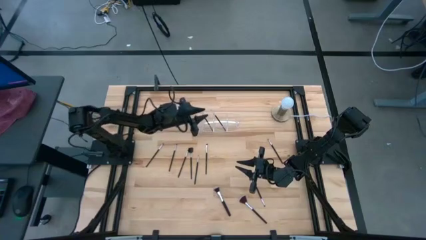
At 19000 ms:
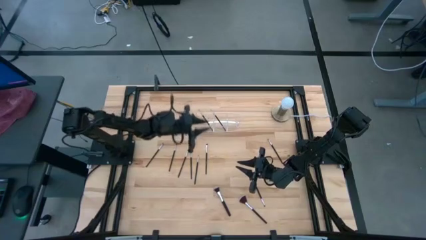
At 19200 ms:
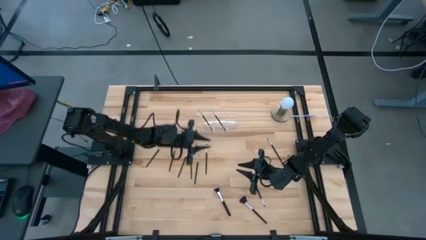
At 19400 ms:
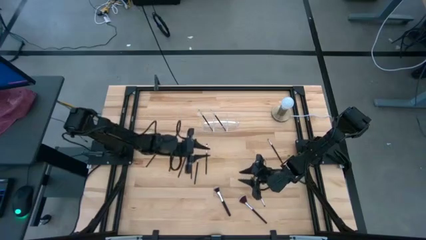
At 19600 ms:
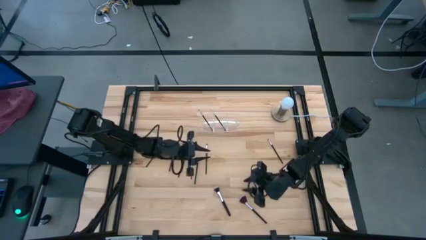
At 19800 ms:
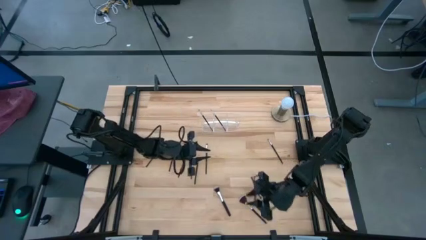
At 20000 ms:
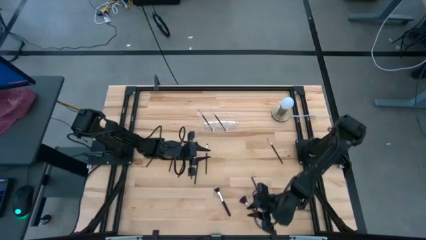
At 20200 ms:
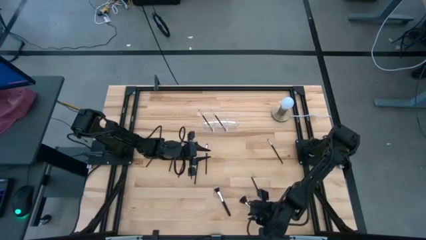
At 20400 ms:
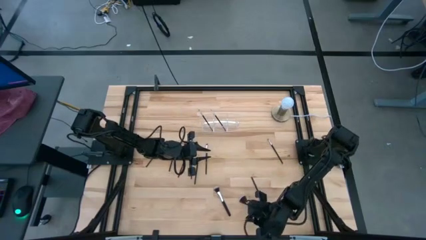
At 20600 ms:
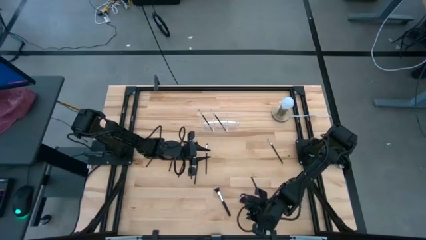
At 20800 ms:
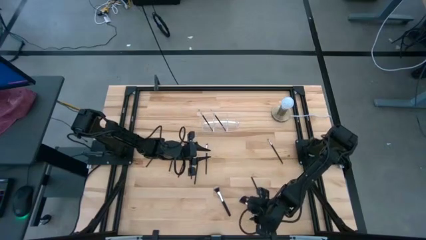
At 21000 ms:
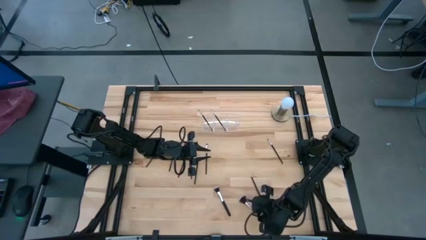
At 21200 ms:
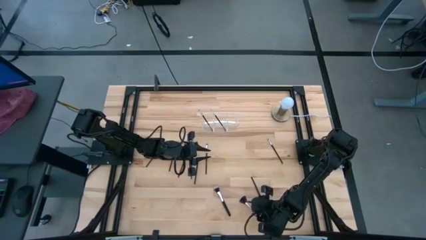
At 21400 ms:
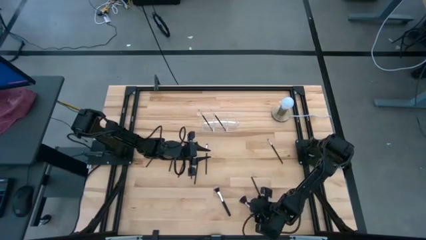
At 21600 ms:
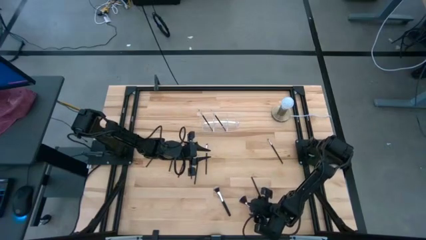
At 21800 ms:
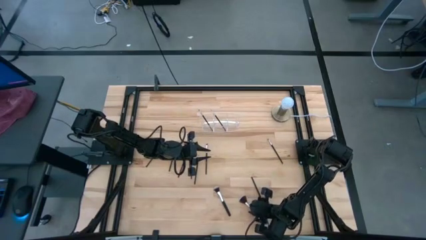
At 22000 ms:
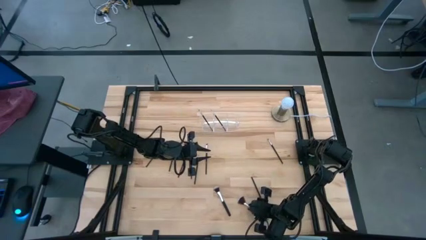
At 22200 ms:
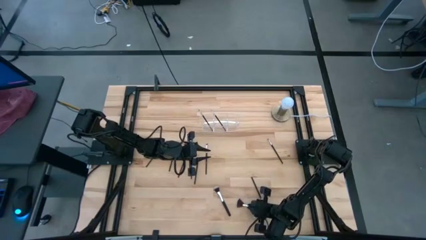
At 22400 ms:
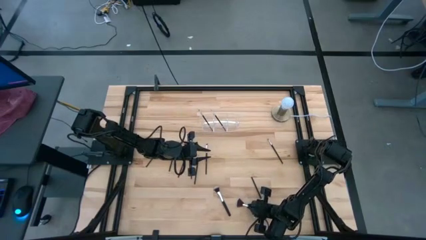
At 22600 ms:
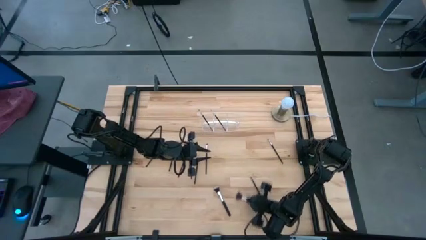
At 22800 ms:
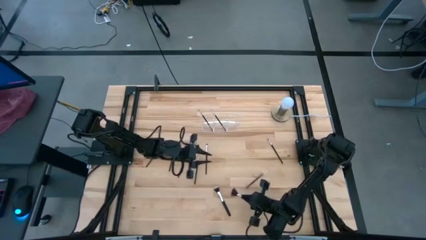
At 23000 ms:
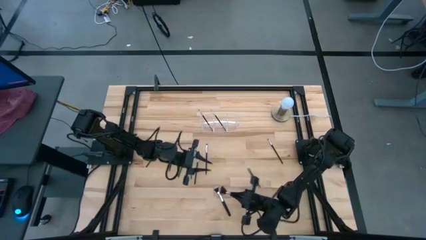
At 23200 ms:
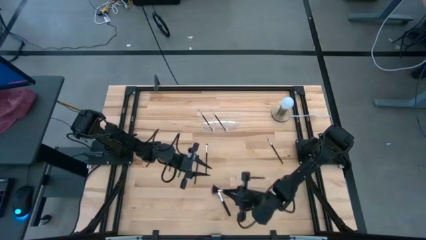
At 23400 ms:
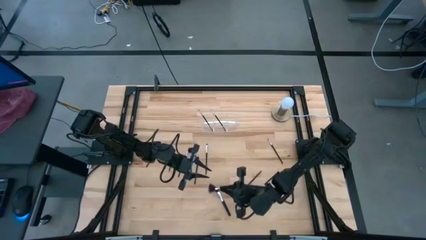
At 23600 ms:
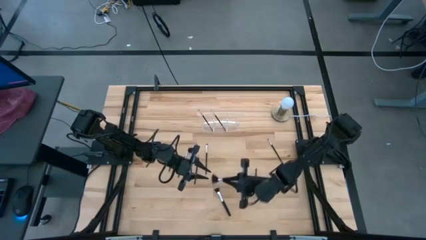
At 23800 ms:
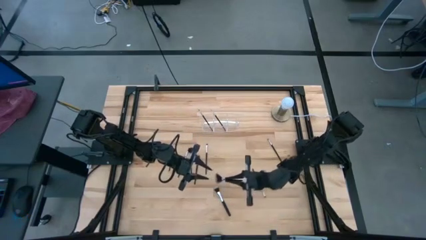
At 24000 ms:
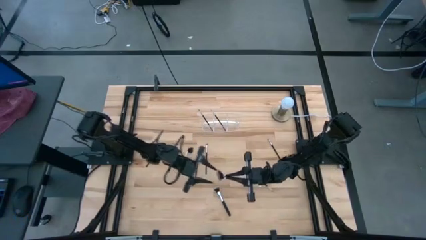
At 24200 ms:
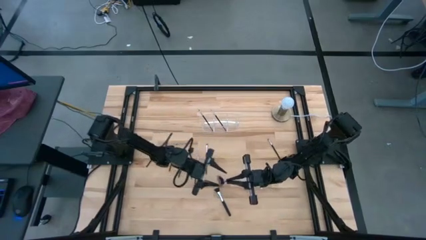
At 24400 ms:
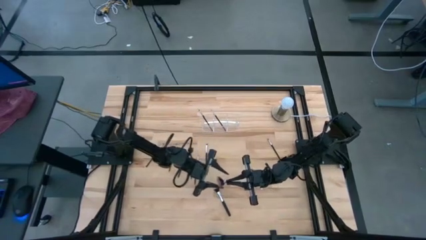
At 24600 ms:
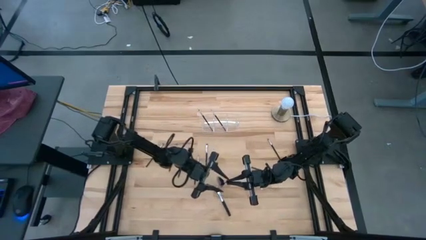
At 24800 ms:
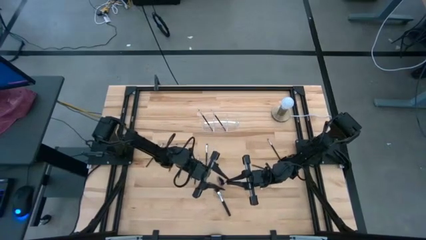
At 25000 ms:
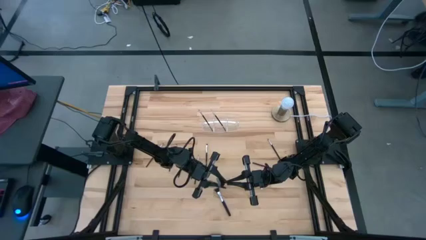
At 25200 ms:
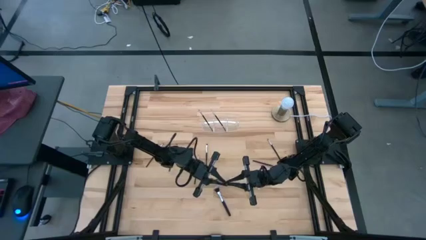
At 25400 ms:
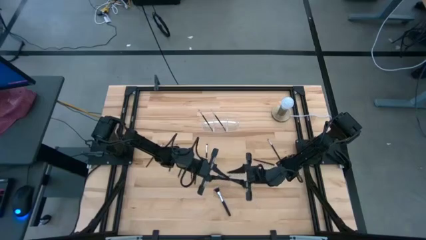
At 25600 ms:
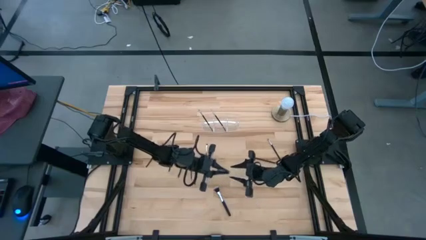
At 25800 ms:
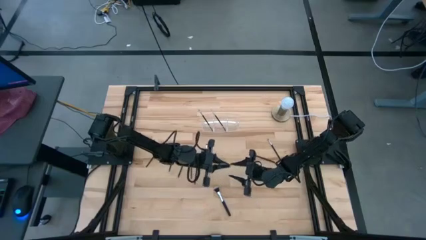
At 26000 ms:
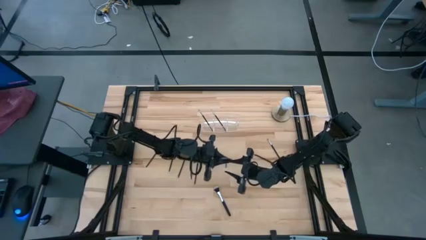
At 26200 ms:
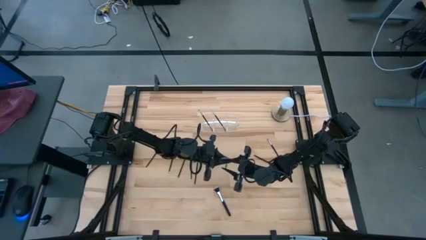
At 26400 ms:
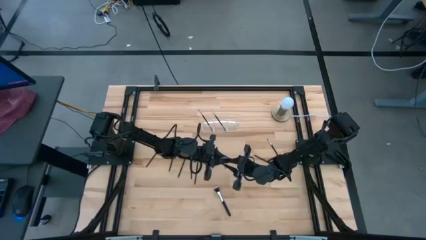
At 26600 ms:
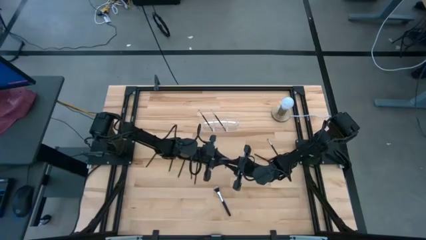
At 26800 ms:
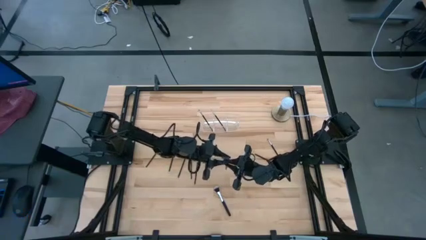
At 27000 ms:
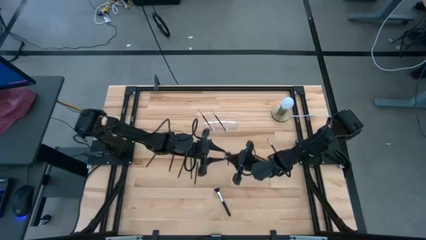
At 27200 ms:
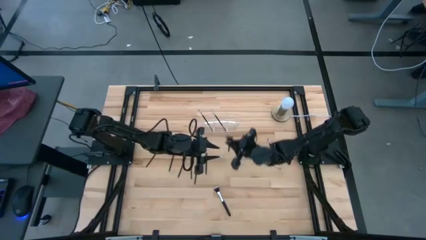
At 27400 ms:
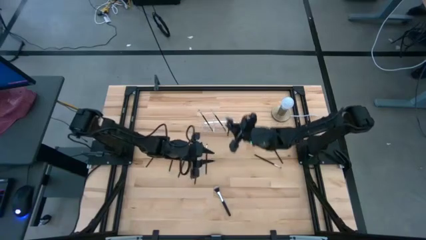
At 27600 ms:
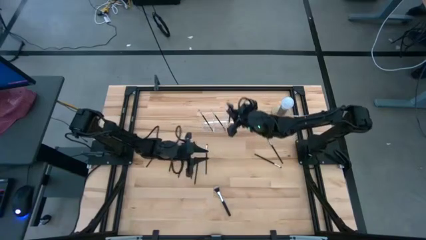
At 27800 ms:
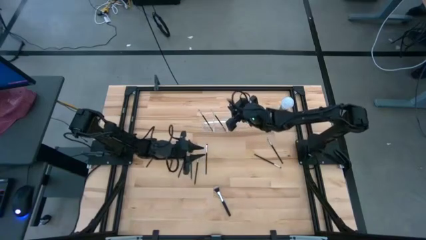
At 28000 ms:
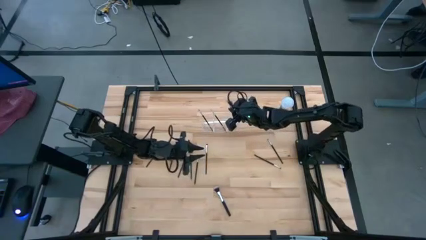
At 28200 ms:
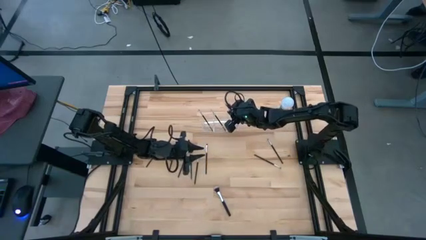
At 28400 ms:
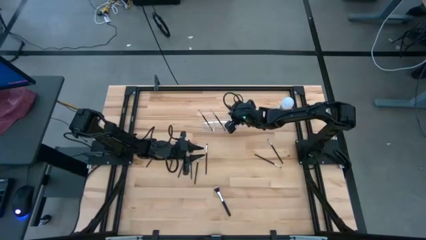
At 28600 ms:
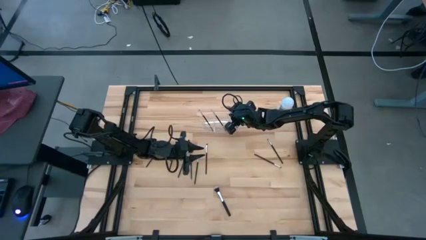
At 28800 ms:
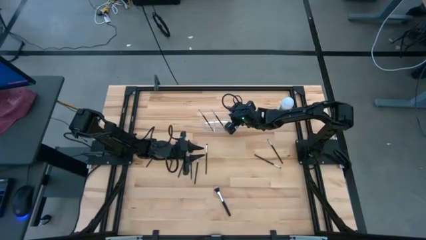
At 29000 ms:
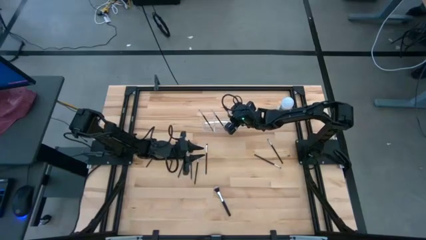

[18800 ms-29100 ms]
Task: Put items in baskets/containers
Put the black highlighter brush into the transparent organizer

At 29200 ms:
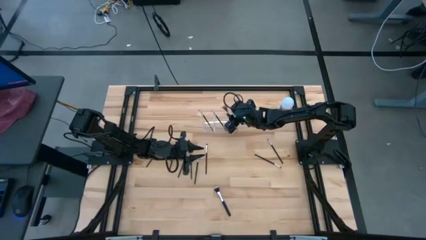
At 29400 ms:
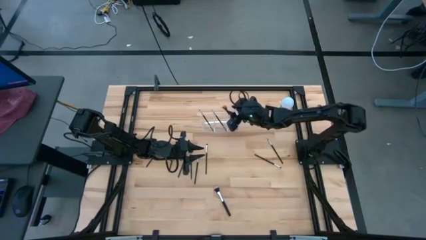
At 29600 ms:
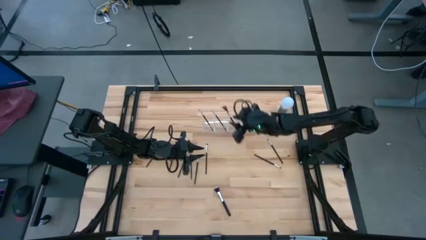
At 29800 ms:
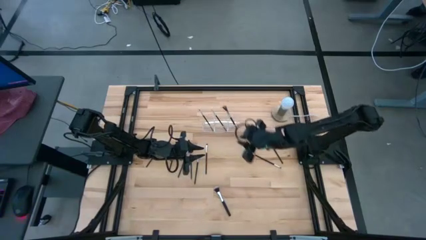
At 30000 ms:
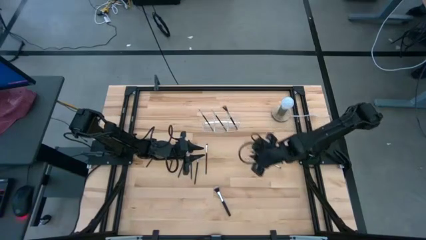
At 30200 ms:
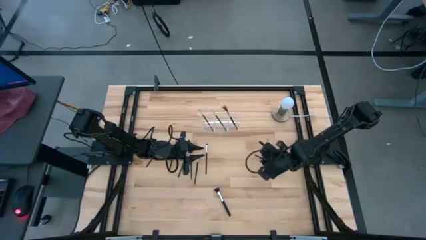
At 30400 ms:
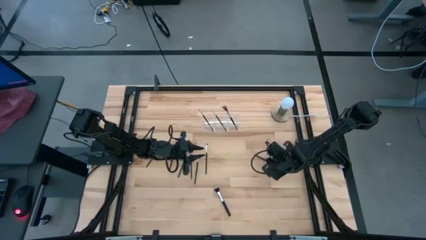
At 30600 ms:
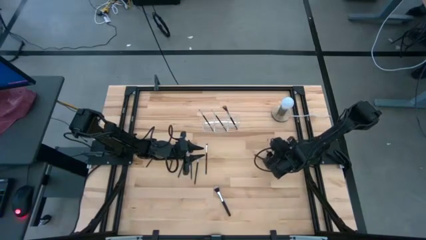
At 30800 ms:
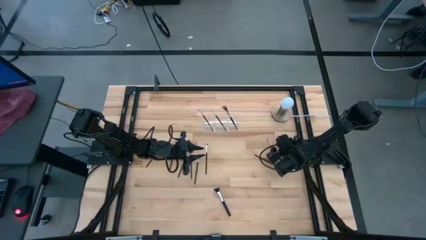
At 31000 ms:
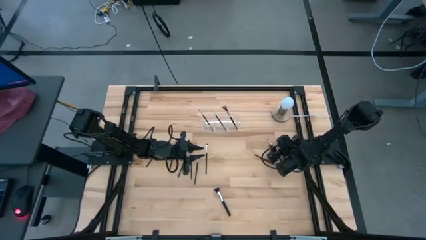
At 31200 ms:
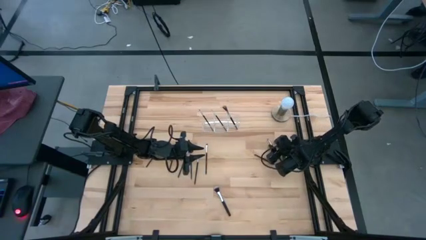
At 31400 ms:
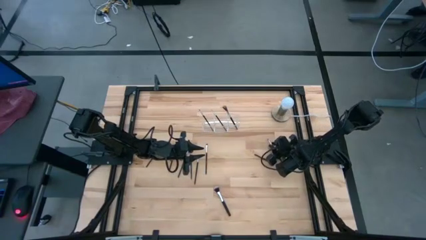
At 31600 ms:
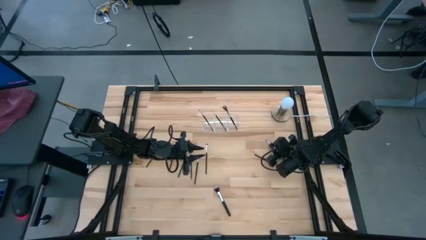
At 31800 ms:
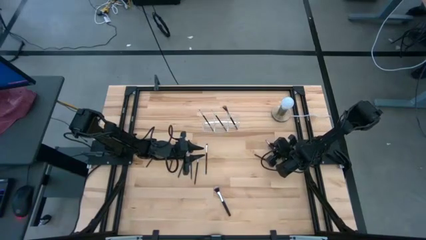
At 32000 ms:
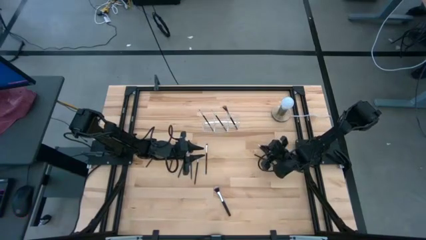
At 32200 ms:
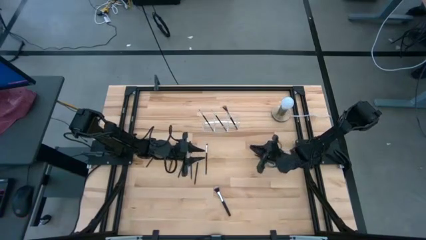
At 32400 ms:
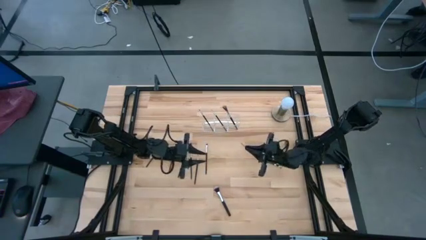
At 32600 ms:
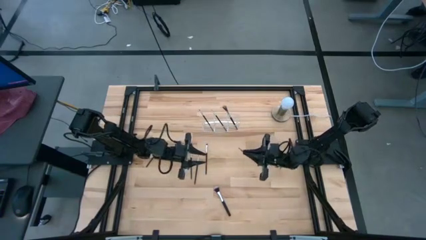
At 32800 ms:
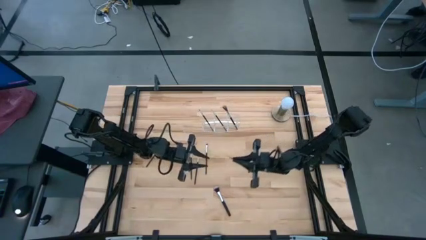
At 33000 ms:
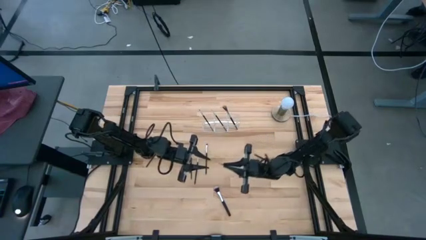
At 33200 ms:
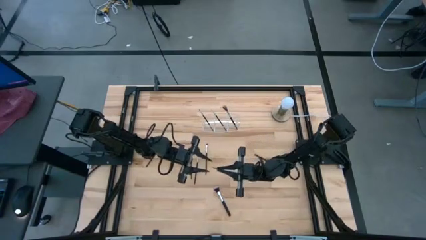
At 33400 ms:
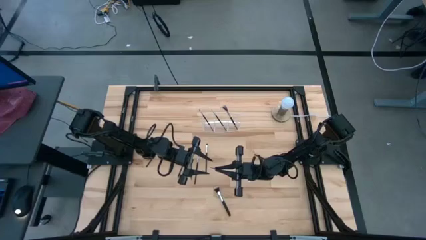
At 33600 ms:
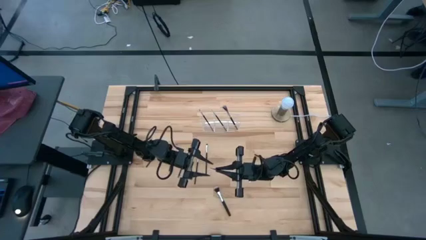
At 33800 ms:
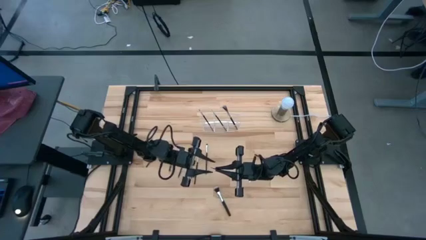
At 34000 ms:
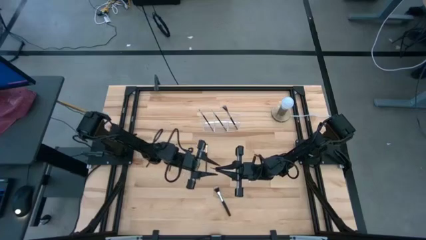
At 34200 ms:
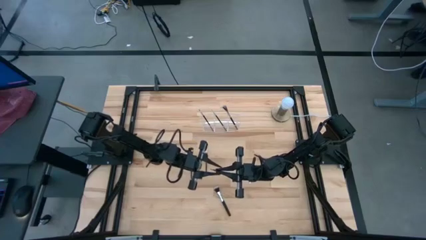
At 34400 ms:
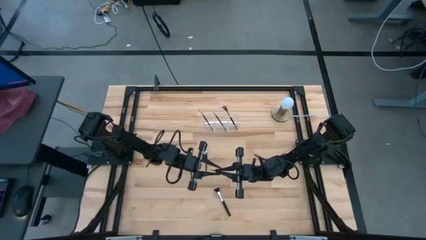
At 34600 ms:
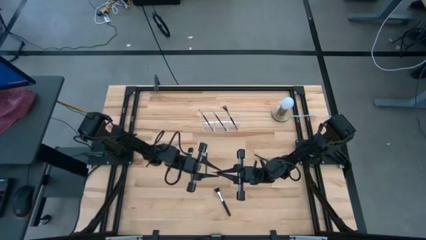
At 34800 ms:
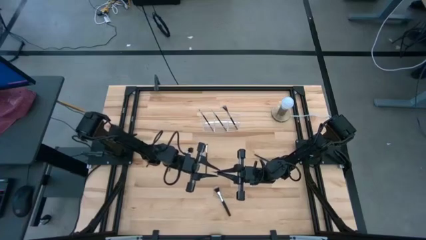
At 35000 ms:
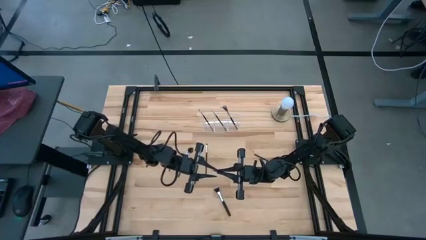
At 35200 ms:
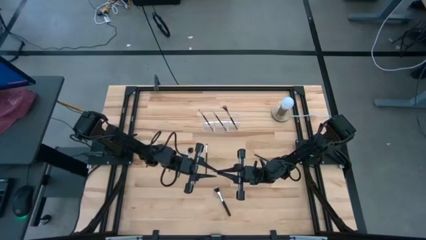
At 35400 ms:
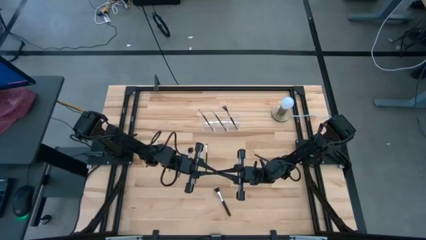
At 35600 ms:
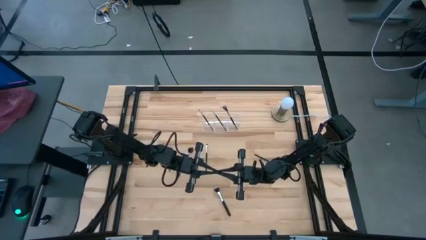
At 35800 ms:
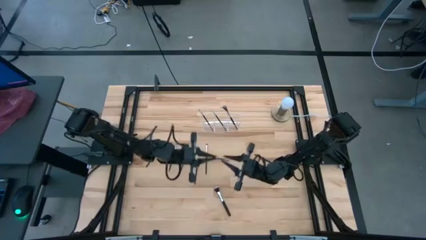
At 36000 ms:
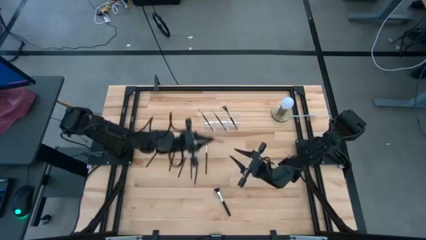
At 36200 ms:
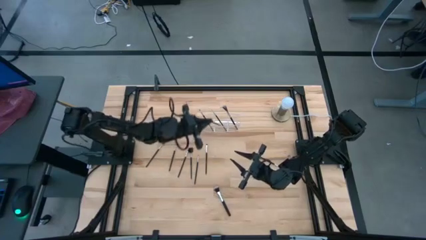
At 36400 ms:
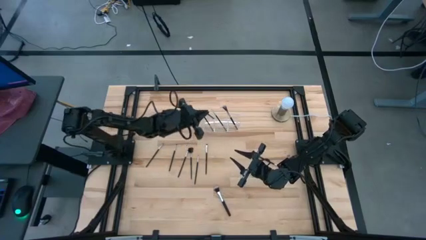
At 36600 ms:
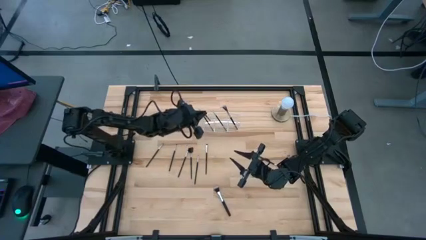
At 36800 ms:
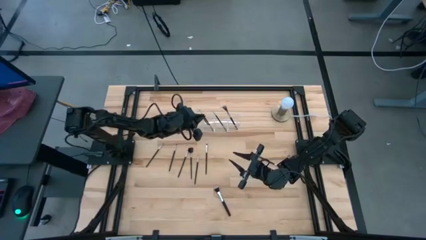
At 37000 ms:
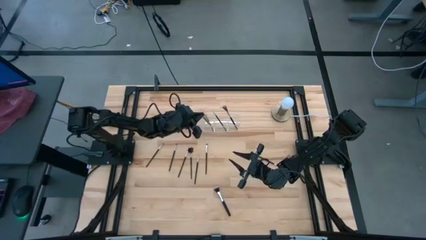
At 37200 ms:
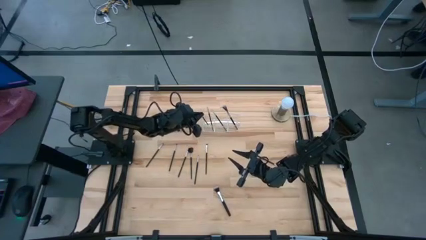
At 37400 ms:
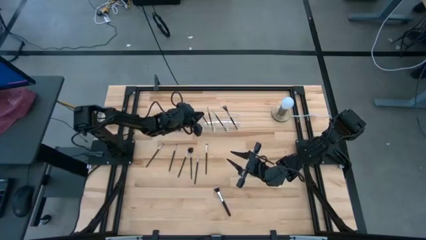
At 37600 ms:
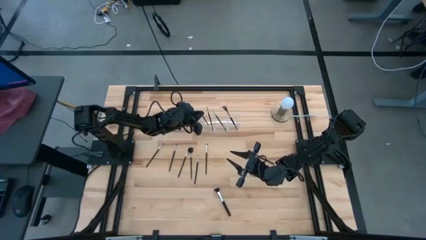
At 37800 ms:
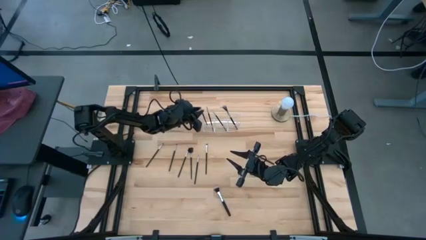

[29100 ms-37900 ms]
Put the black eyeshadow brush into the transparent organizer
